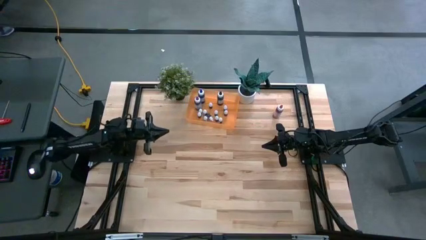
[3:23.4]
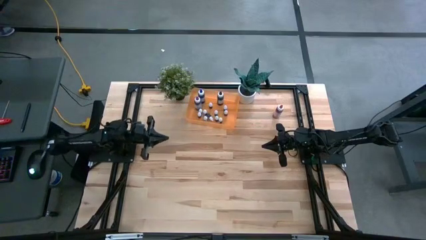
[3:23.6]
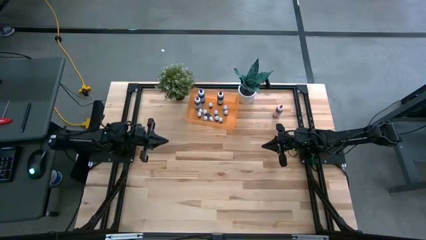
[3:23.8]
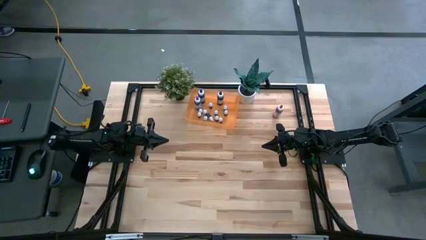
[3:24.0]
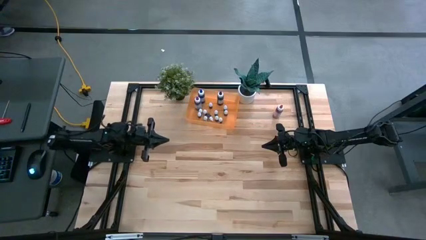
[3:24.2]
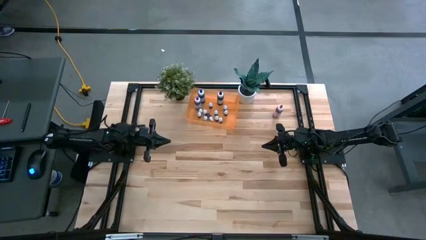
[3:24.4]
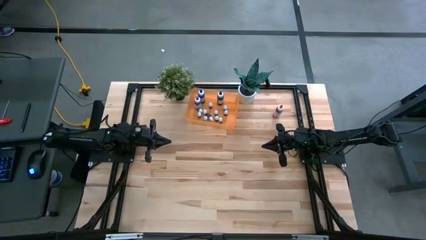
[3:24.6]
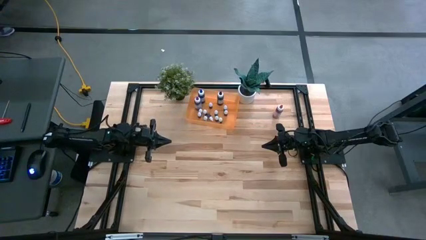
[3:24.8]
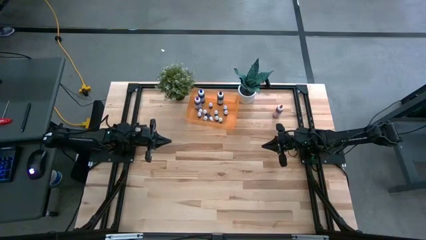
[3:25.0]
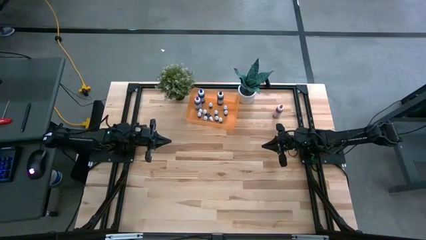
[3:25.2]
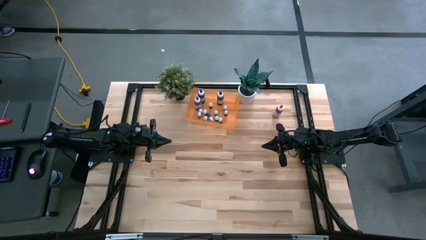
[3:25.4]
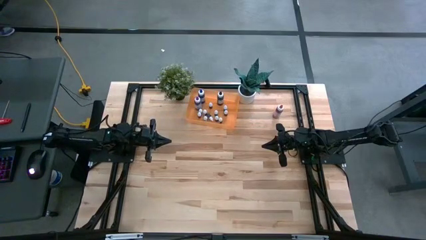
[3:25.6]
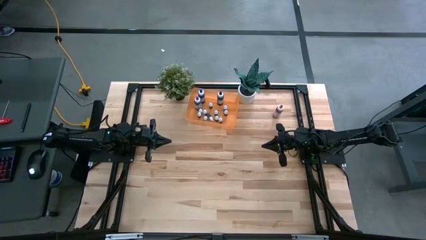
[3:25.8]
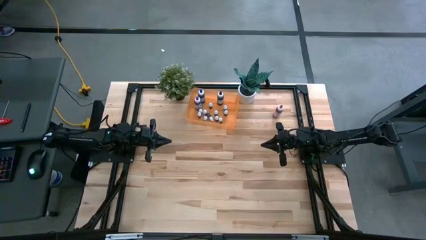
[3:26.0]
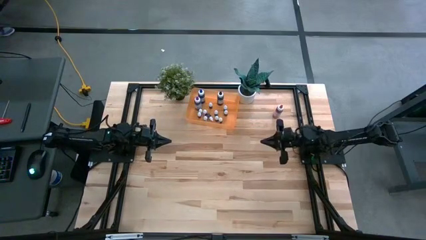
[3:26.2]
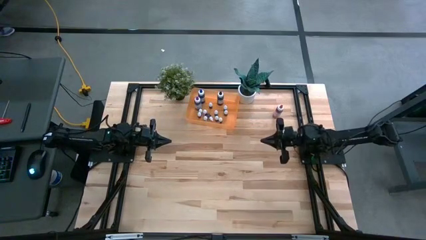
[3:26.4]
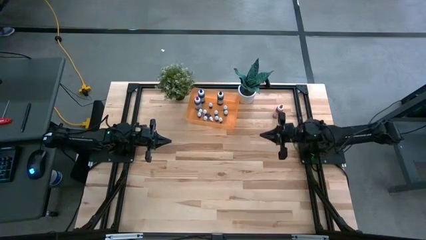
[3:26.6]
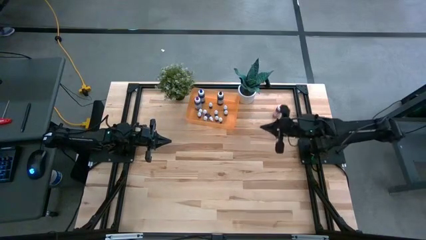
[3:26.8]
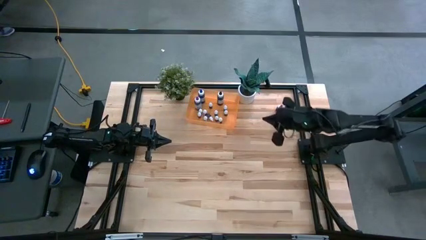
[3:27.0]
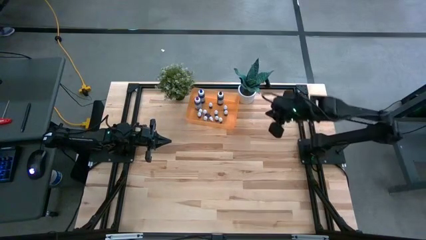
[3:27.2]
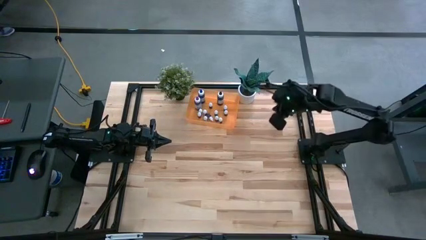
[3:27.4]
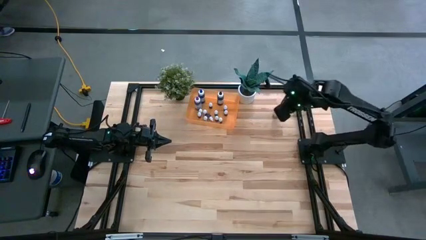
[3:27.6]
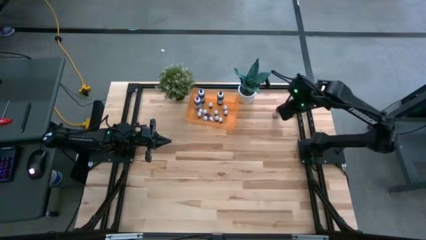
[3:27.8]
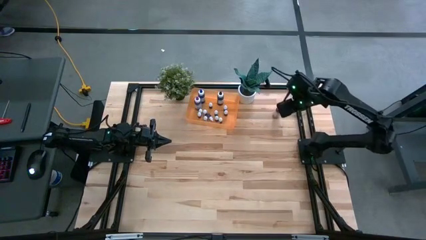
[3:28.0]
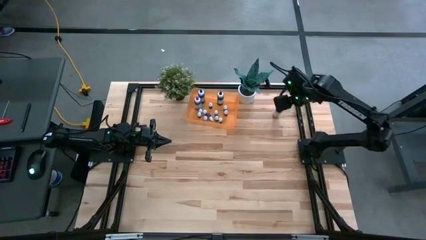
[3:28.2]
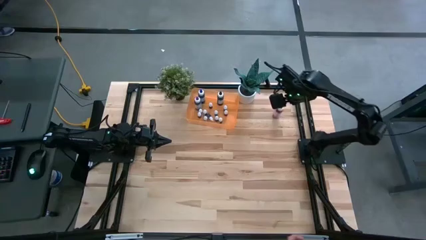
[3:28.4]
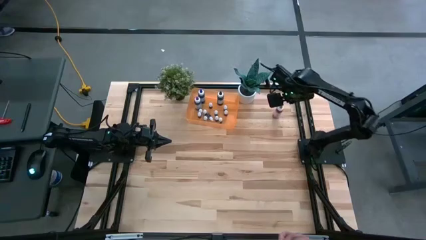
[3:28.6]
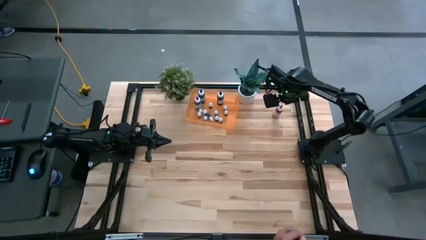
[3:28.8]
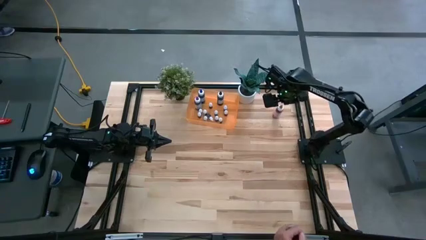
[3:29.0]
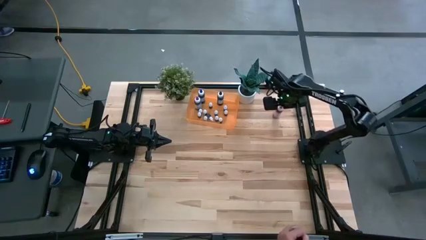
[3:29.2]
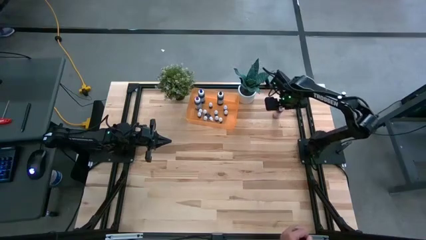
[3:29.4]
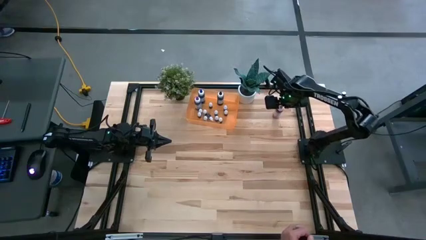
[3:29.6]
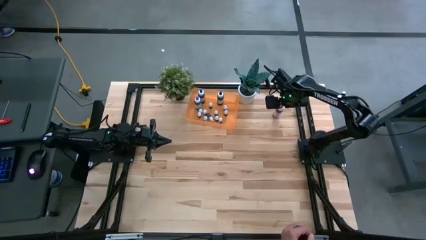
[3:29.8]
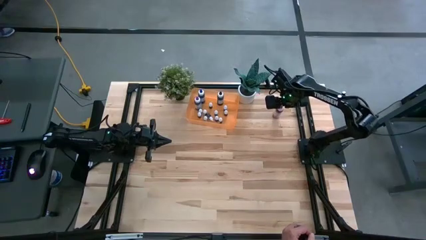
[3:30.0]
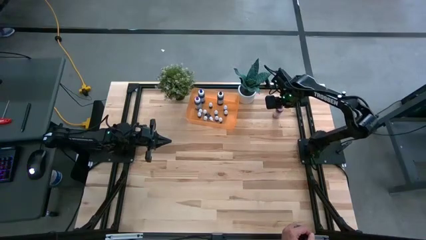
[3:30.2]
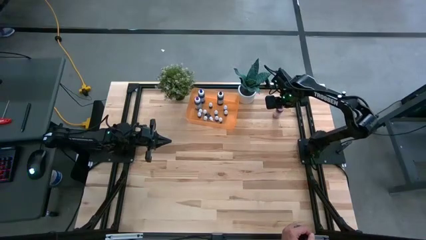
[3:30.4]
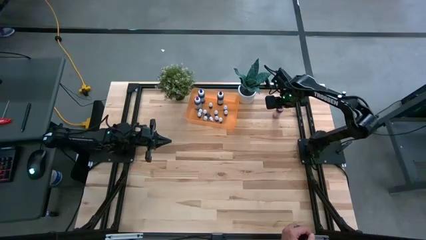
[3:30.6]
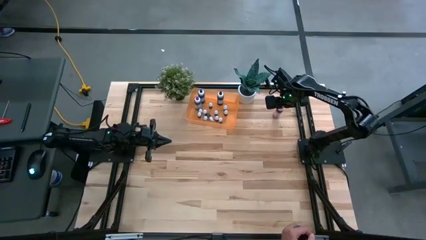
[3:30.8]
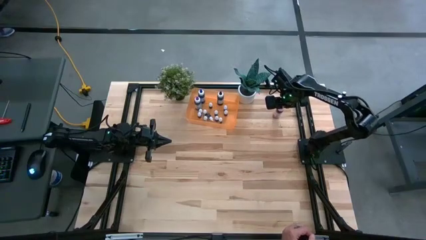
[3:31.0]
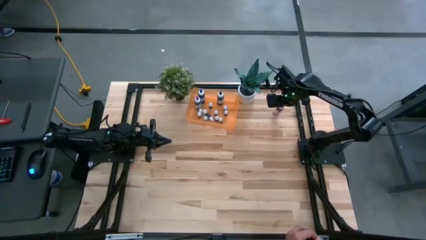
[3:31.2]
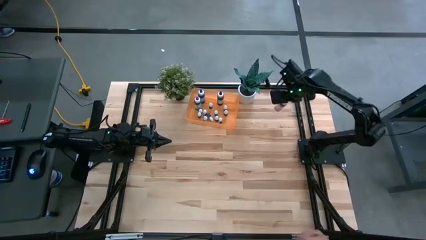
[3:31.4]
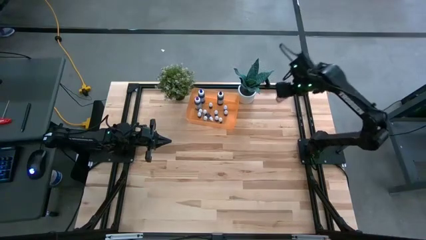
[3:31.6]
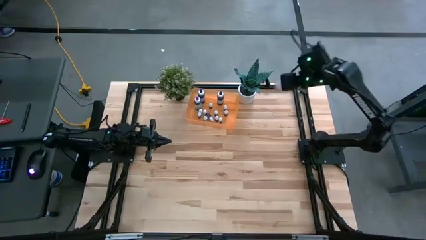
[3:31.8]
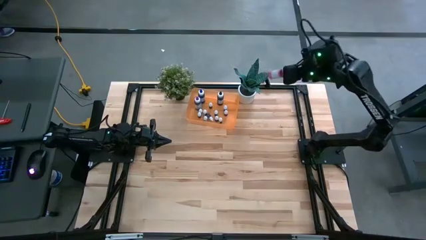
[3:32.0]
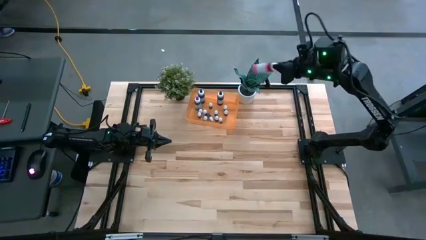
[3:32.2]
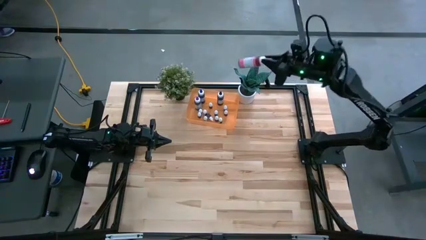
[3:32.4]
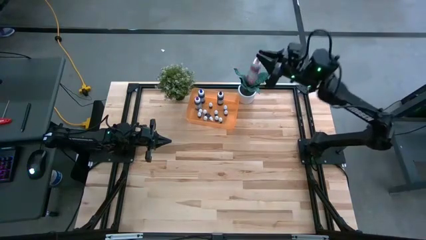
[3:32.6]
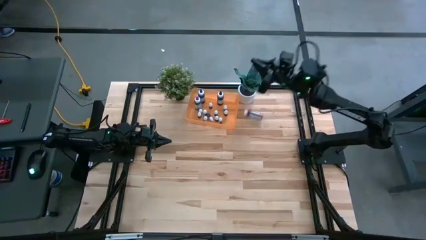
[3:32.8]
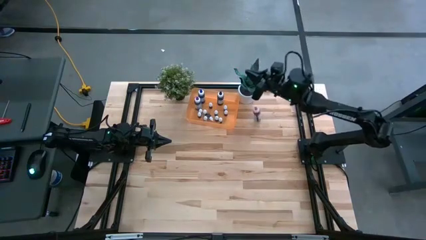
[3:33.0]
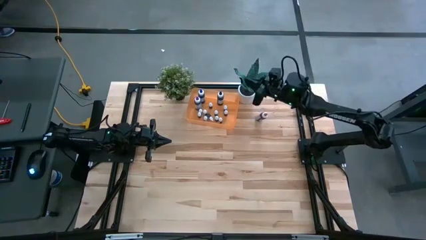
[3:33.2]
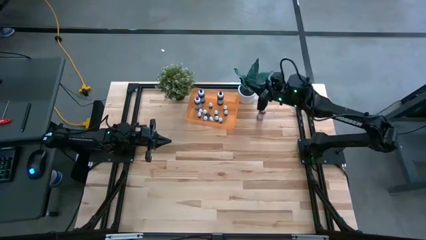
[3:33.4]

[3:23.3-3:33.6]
Task: Pick & Place food coloring
Put the large pink bottle into the bin

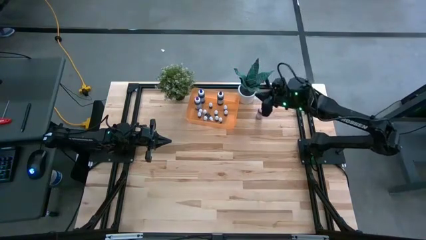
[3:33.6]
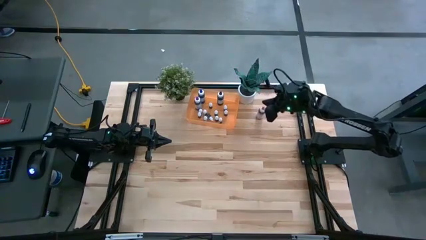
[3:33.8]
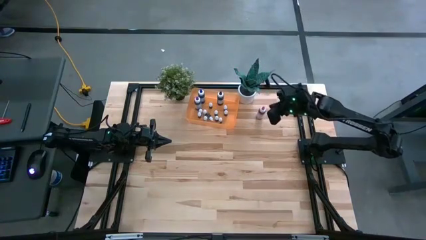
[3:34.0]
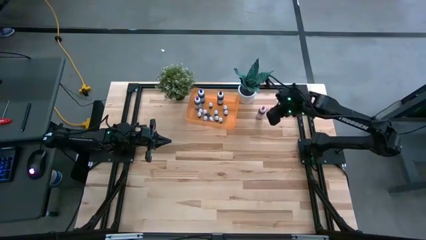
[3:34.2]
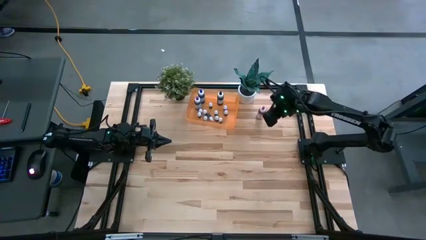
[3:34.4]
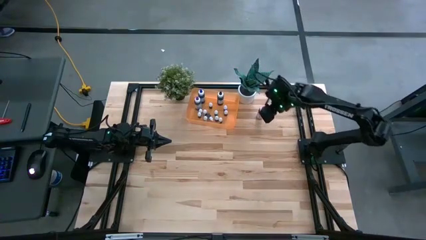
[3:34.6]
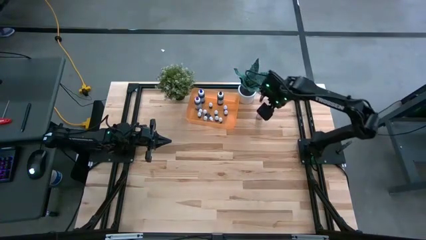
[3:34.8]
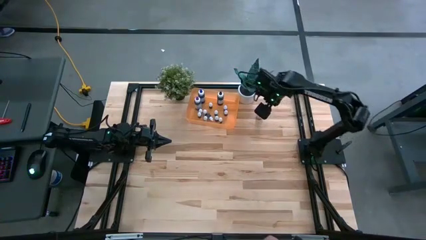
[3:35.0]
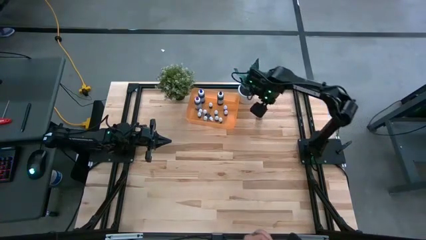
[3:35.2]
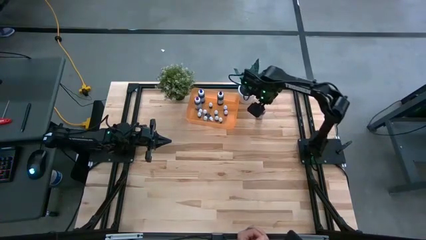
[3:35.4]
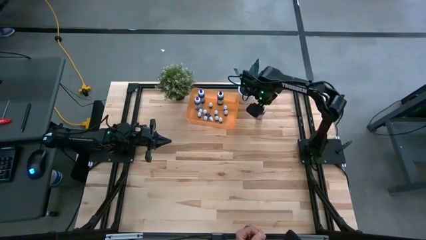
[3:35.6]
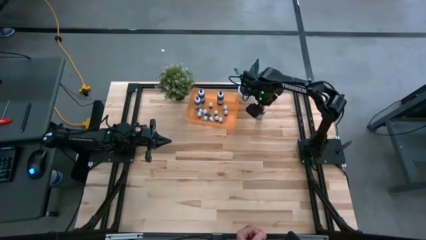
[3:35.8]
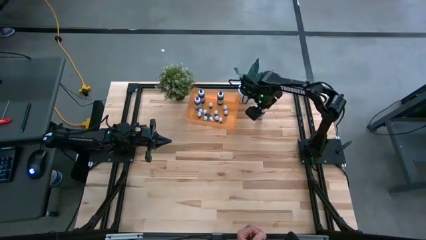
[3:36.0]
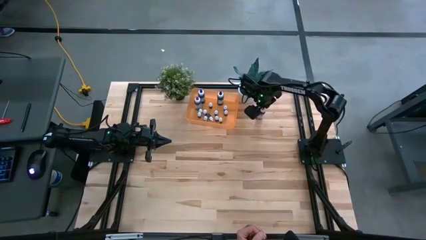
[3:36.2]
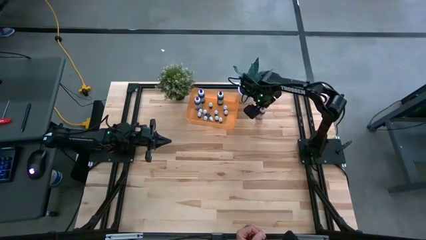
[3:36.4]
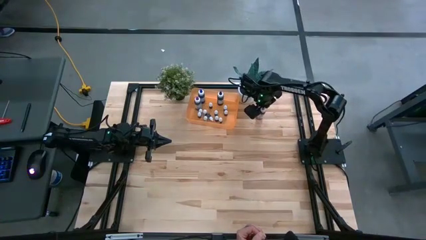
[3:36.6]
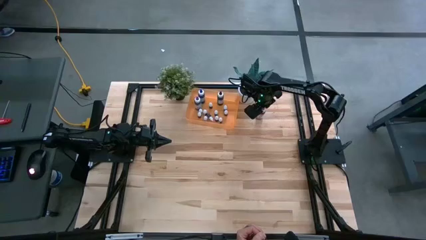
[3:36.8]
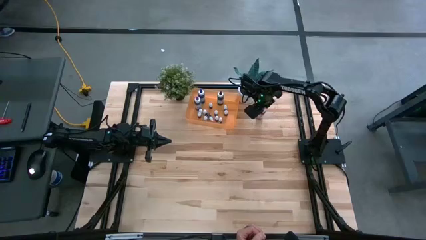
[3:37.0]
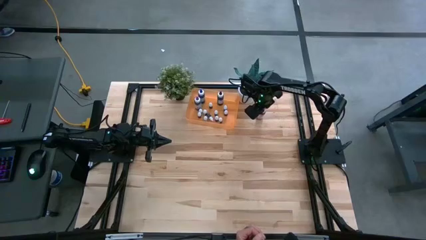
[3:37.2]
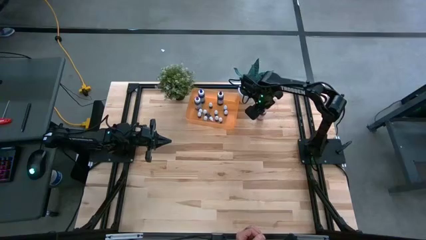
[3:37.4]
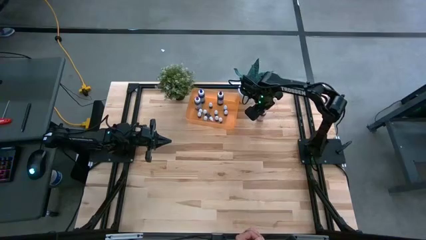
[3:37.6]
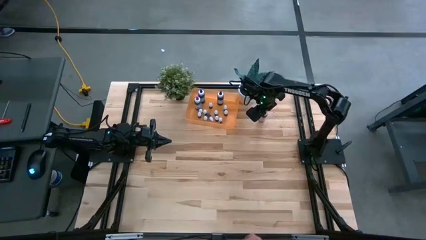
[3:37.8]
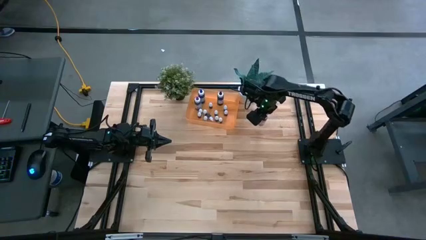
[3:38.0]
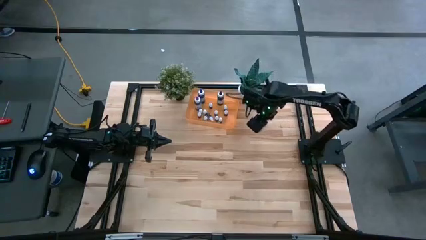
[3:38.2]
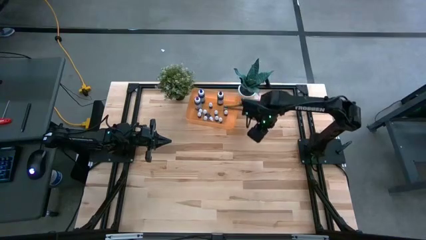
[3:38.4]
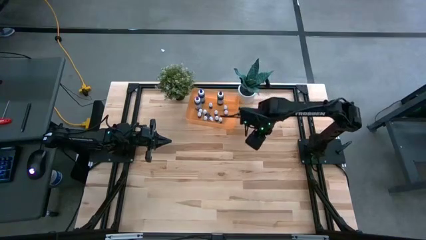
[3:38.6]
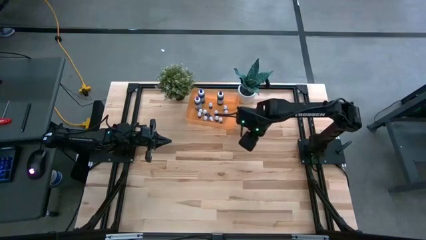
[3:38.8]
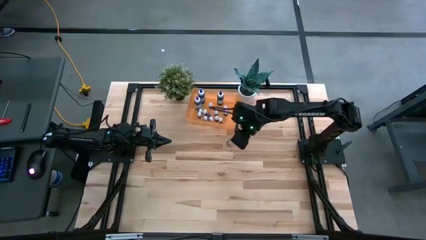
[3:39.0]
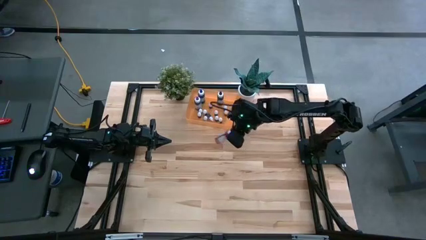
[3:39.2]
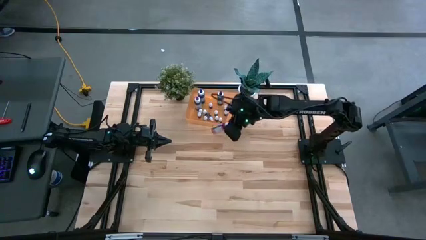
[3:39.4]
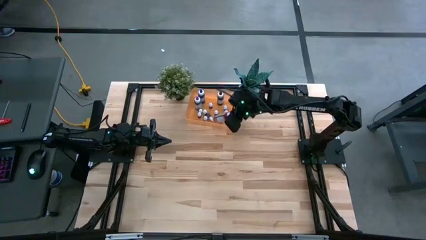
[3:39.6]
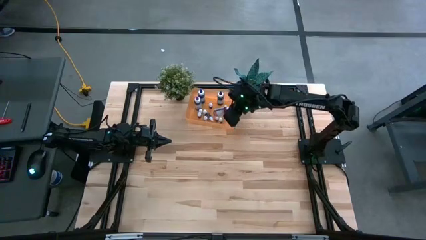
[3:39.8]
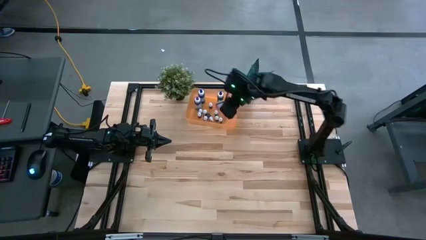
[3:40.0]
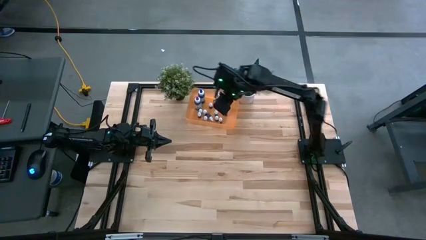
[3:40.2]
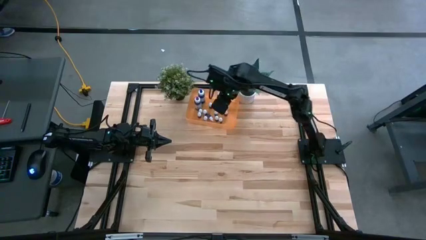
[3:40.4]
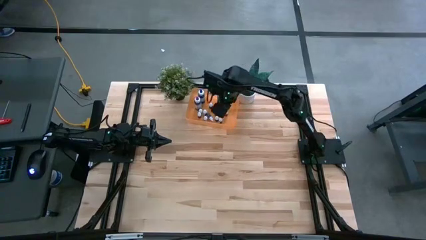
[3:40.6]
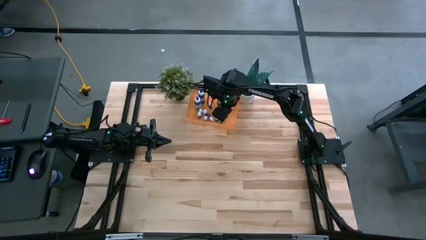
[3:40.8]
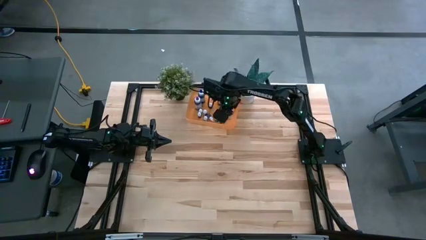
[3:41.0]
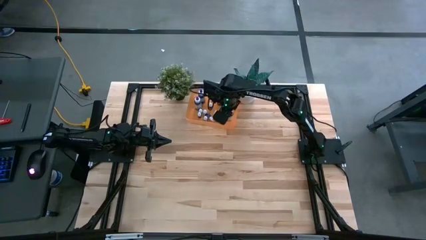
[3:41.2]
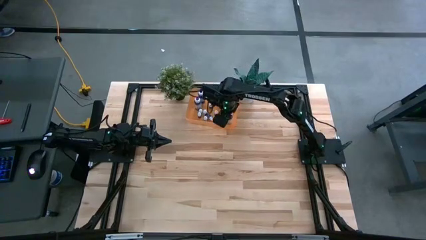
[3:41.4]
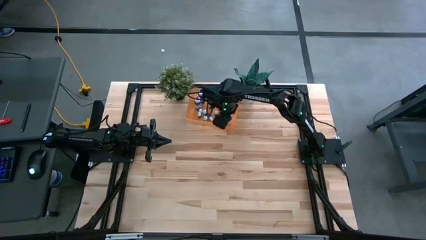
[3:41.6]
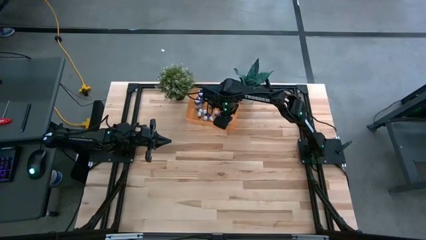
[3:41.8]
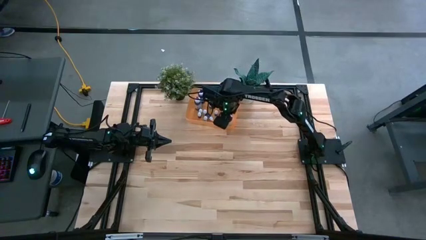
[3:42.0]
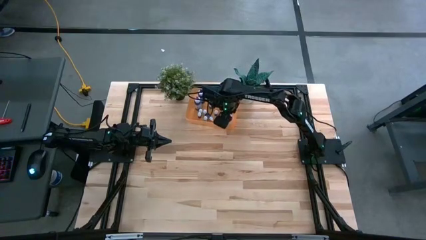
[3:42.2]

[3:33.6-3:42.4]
Put the large pink bottle into the bin
